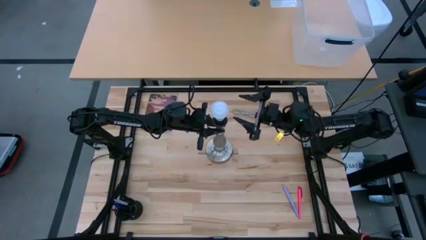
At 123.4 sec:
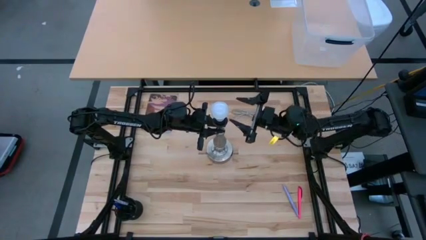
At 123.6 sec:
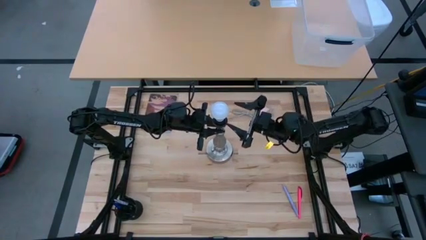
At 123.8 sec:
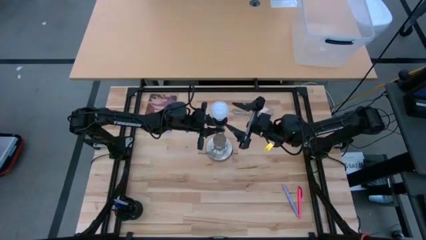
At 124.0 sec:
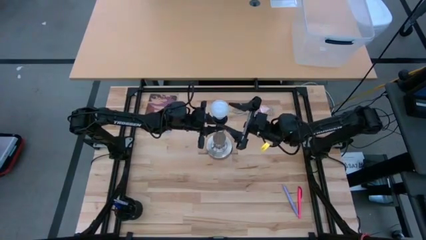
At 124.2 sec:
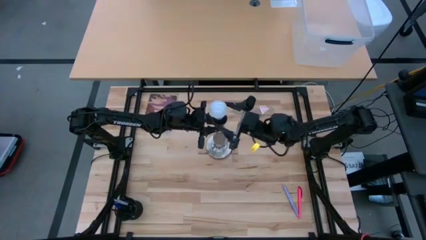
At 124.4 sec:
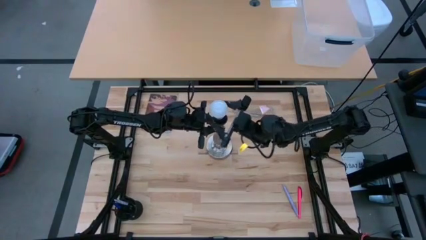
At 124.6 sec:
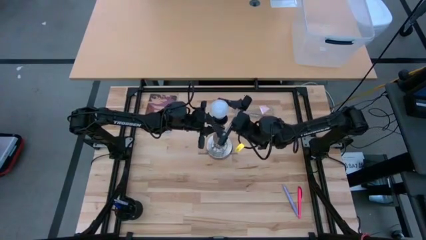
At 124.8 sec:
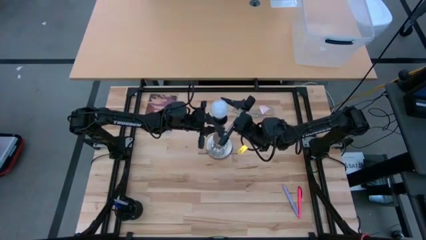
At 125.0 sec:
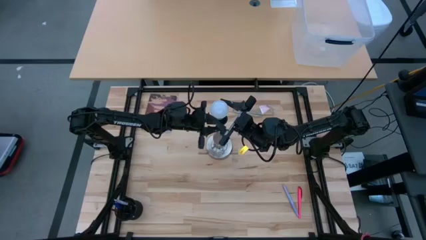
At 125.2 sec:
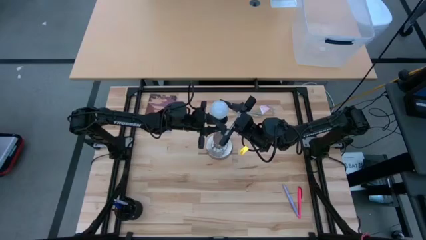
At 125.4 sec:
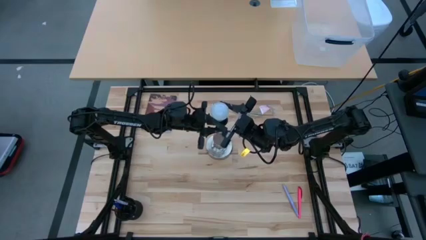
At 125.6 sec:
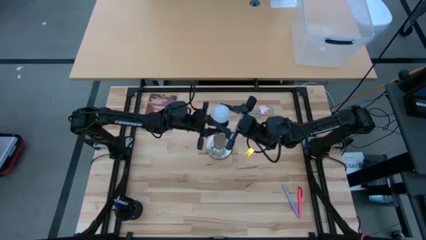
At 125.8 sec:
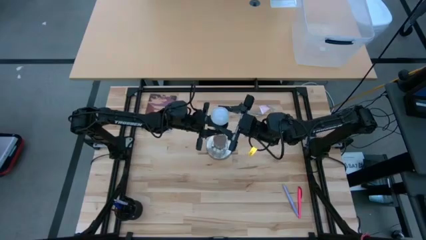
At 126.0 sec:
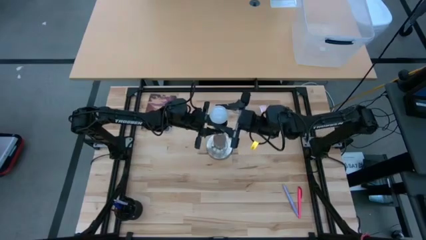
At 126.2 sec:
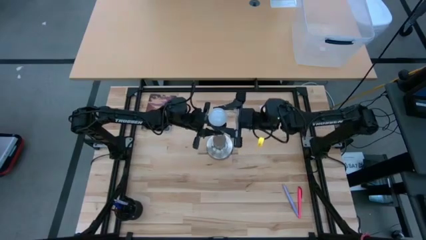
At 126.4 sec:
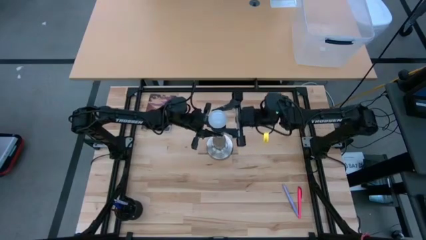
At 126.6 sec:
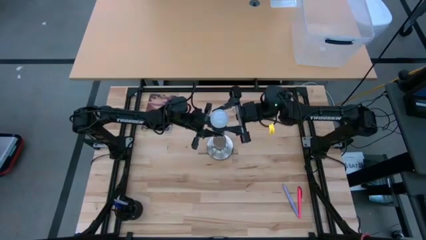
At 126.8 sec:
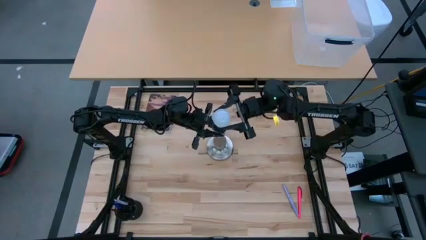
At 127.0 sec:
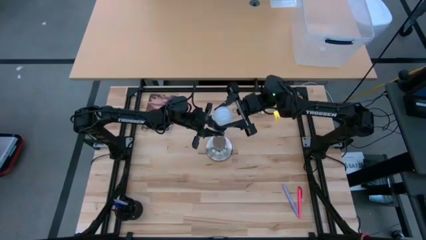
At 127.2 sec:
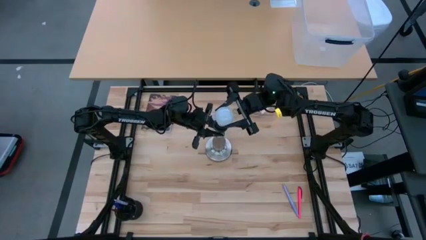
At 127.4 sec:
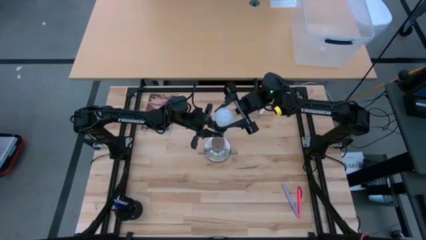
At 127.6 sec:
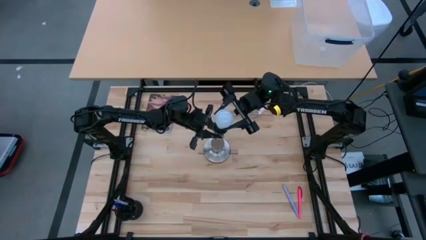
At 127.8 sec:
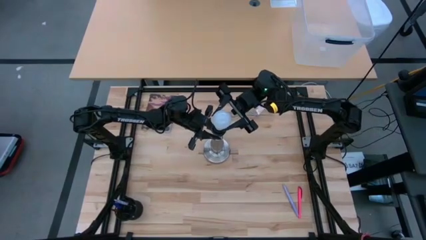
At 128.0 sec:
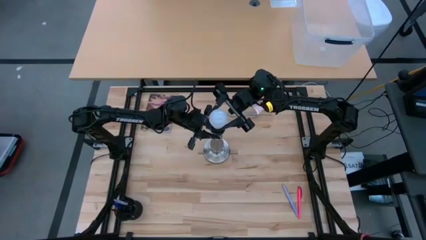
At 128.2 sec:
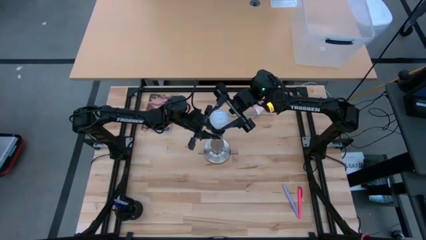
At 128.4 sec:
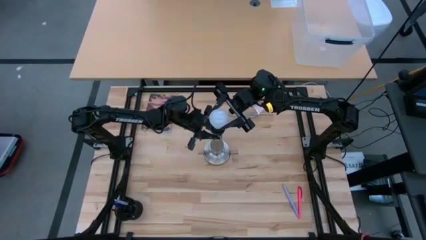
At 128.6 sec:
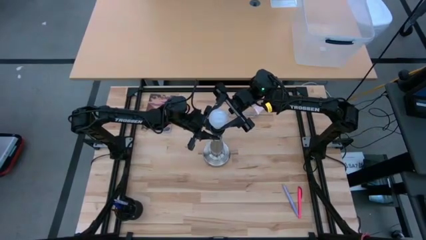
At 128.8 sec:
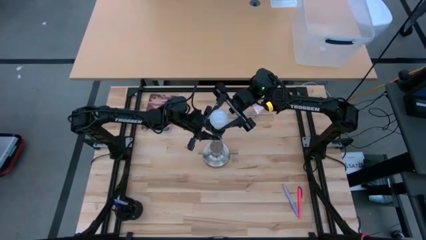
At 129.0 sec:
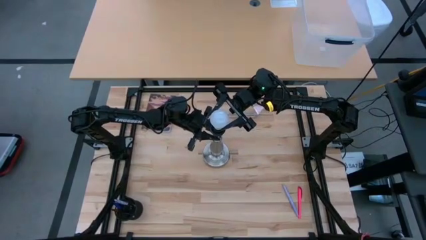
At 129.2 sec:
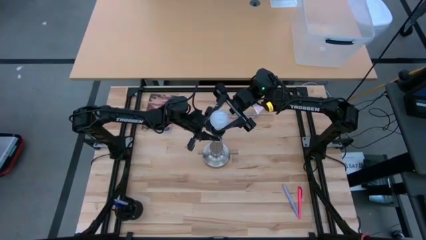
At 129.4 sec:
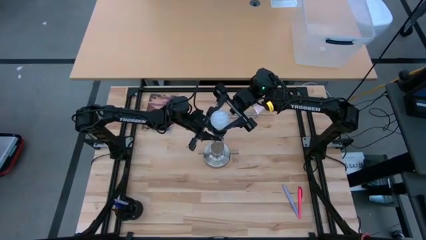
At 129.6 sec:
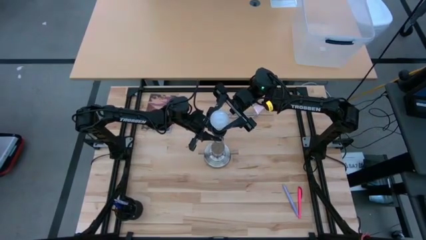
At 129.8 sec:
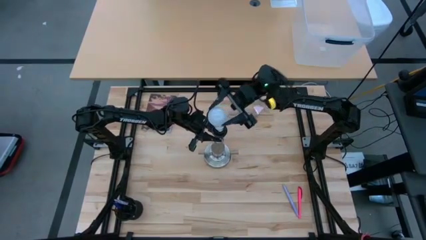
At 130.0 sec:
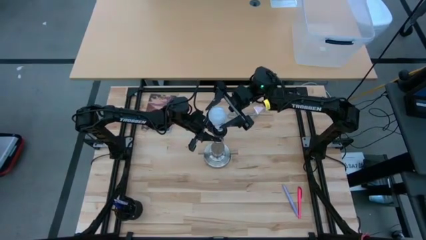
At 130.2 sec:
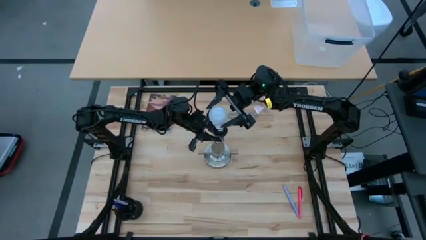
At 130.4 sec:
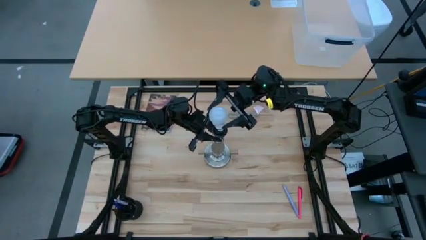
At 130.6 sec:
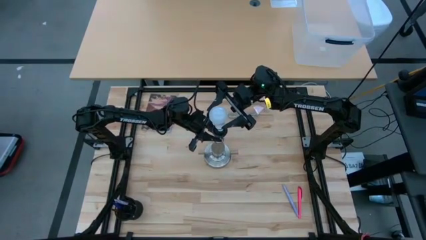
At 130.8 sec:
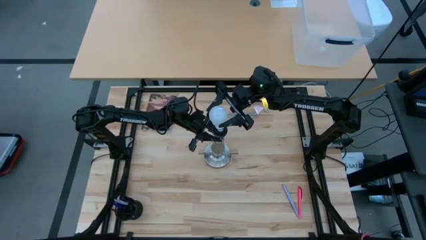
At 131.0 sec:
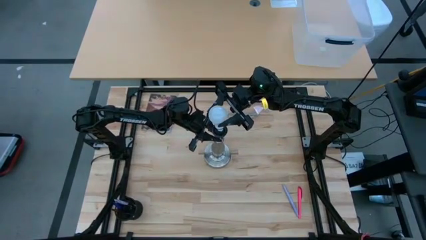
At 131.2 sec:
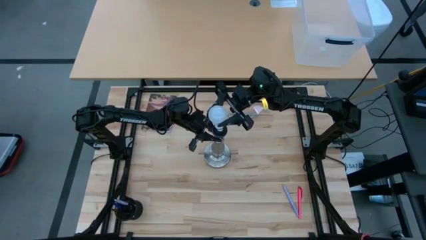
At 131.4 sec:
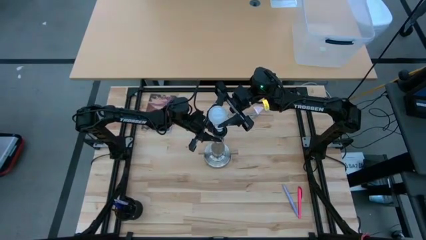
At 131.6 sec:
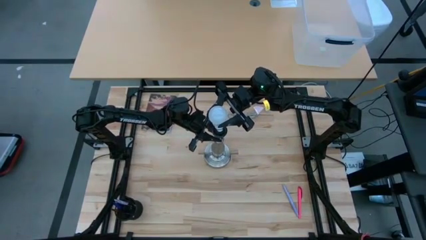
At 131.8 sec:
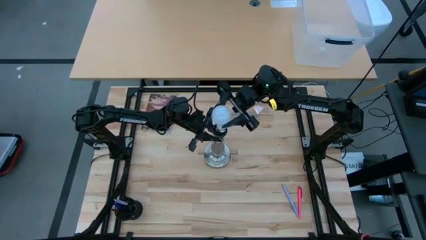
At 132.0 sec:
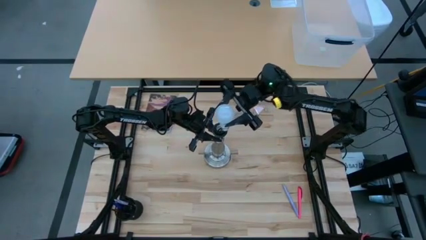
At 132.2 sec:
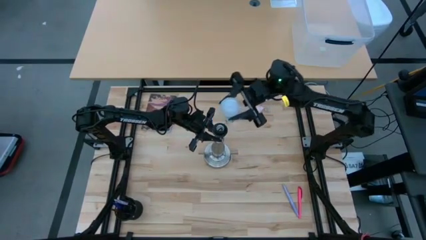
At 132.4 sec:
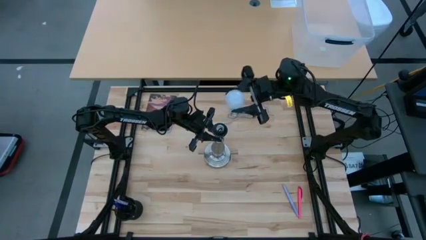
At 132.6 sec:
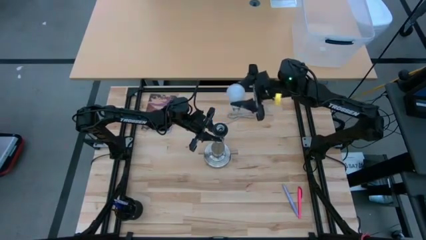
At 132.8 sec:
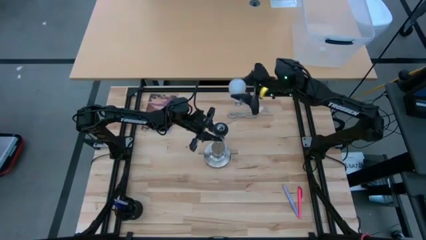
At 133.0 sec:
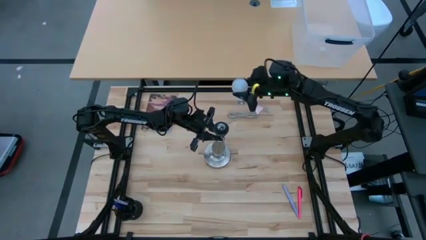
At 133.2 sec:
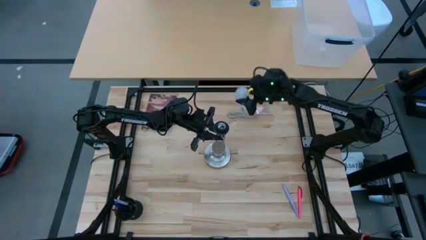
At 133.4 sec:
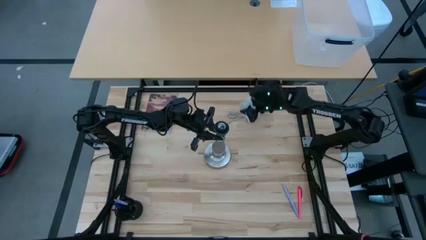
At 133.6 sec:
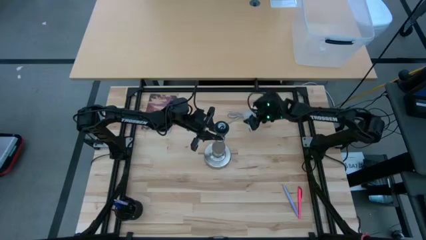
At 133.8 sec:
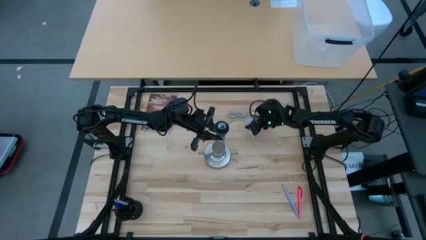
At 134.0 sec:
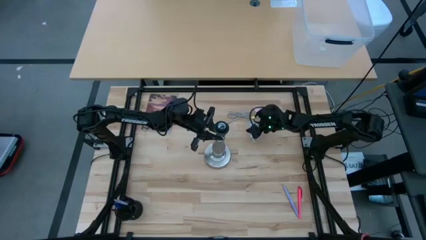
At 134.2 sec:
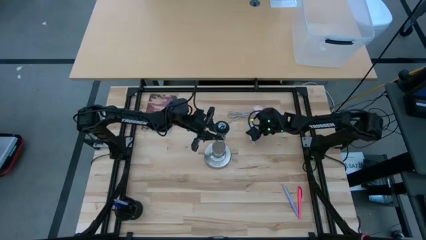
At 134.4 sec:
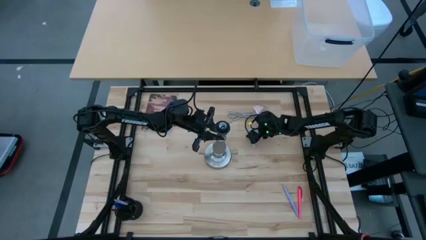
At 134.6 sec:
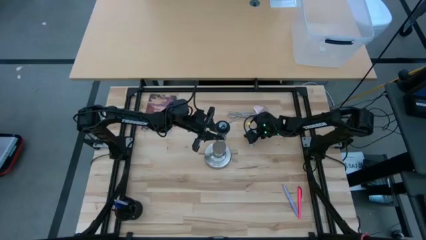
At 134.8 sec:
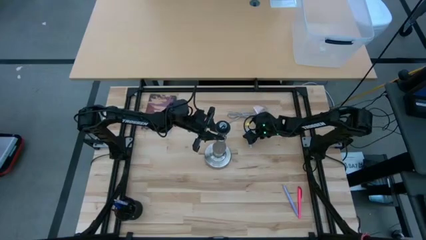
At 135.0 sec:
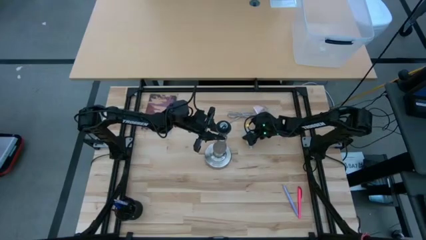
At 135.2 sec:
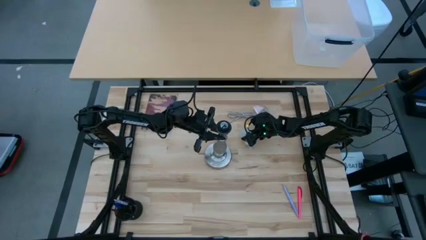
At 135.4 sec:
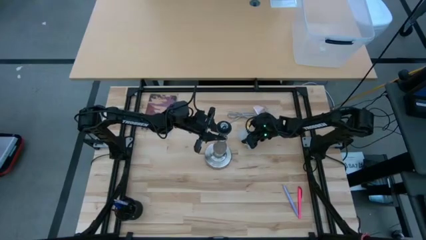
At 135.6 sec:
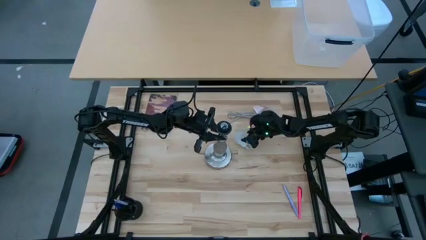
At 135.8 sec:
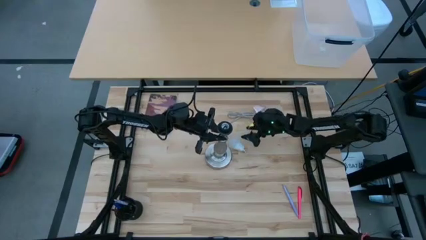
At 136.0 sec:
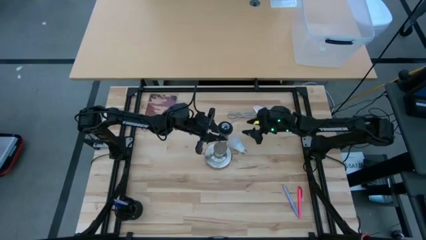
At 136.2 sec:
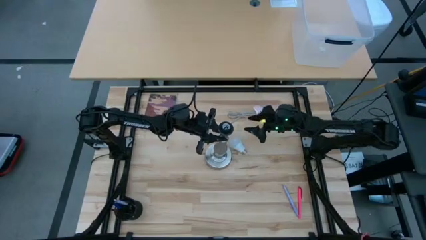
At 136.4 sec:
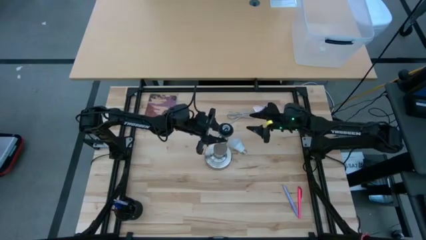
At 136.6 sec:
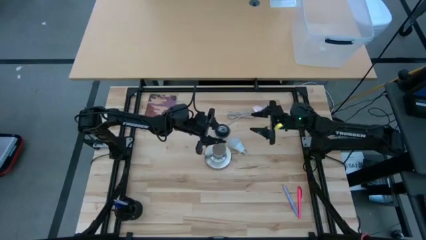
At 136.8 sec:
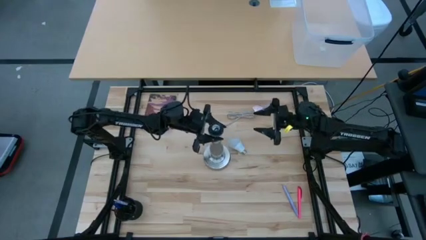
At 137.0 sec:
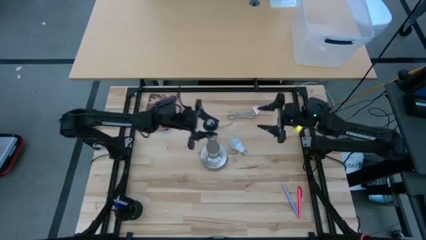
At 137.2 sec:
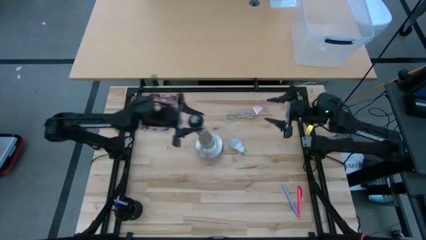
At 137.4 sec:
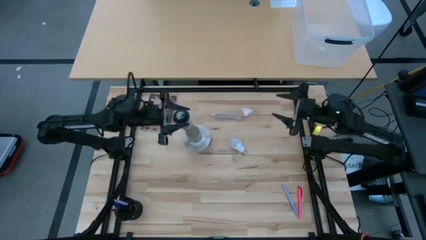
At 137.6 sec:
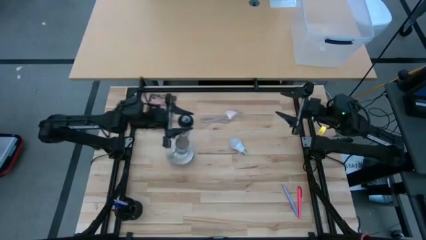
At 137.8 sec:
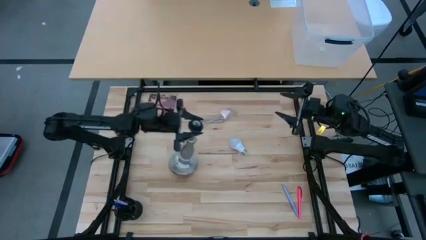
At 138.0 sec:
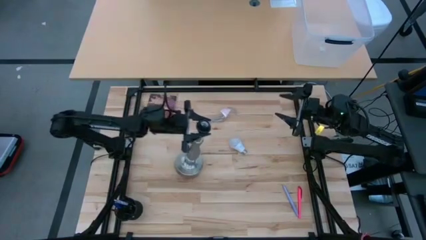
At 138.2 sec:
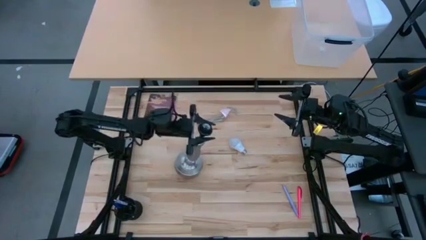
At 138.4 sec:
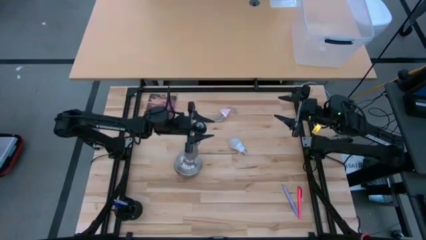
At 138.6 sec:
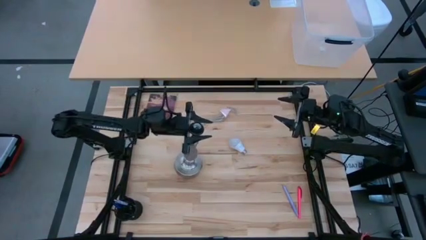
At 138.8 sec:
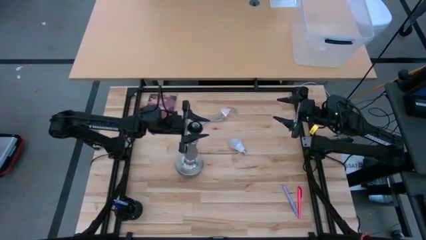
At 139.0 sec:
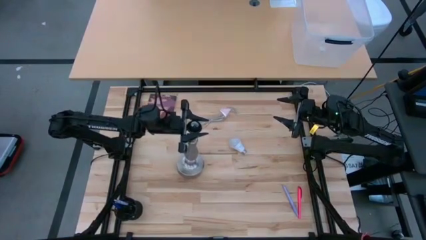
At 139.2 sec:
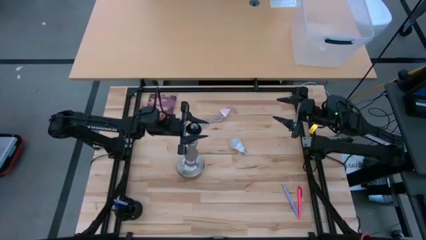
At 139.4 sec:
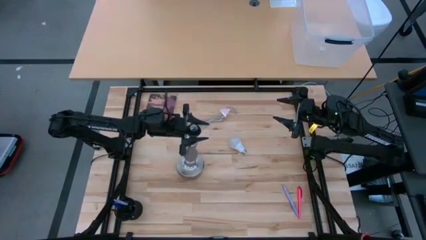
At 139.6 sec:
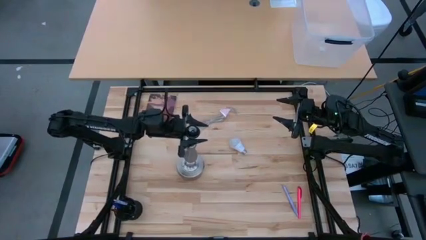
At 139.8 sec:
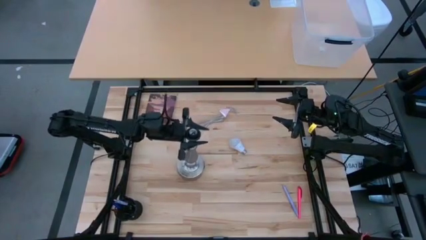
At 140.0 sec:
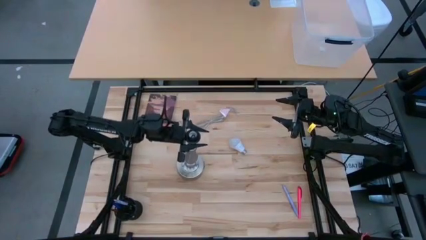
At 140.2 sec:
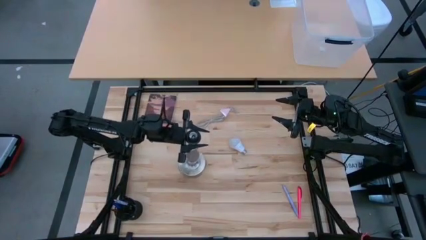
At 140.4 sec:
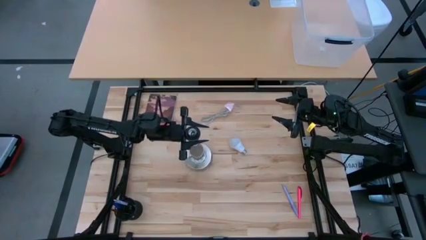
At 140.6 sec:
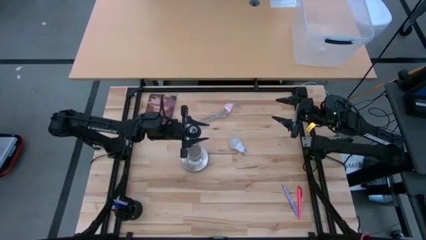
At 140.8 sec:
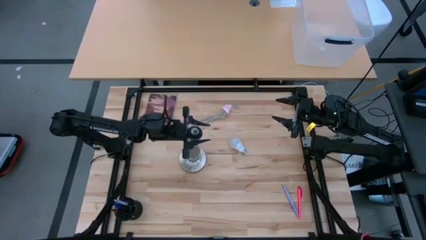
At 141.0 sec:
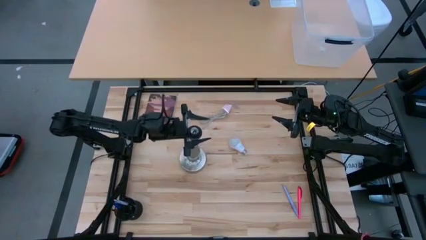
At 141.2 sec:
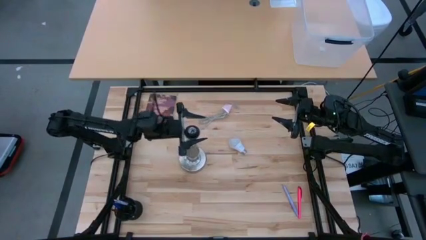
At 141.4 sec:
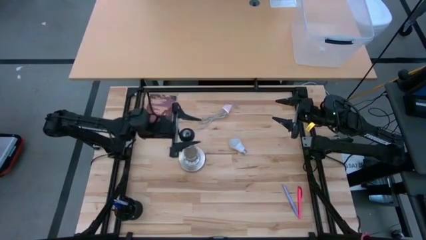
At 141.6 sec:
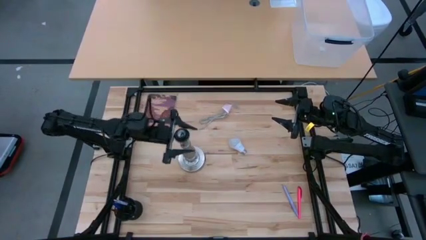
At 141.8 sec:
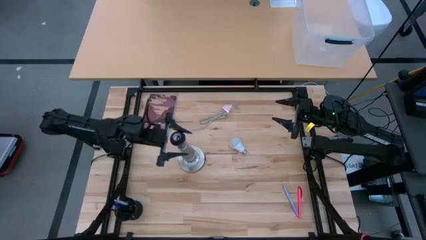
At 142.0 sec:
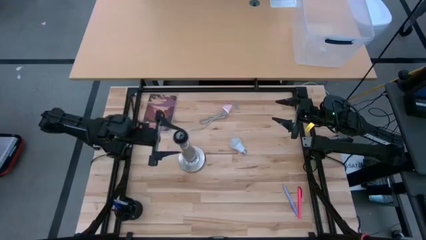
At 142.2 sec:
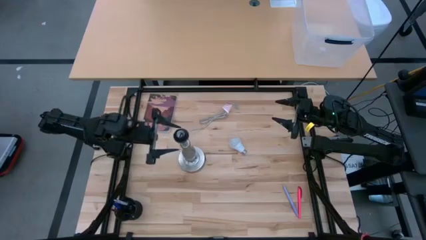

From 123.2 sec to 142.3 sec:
Task: Screw lightbulb
Remove the lightbulb from the lamp
